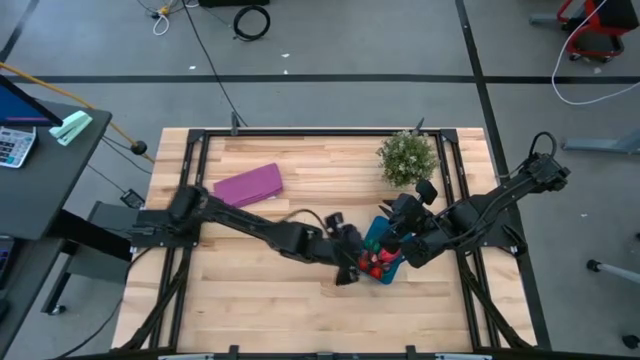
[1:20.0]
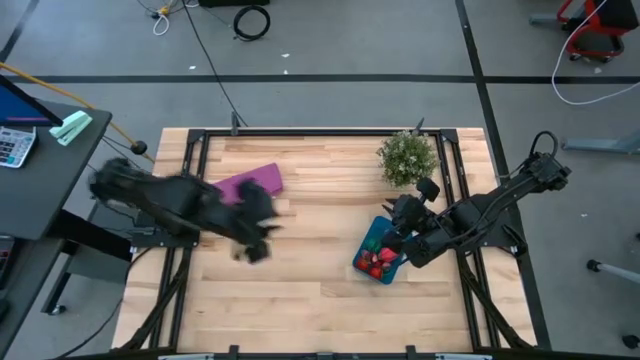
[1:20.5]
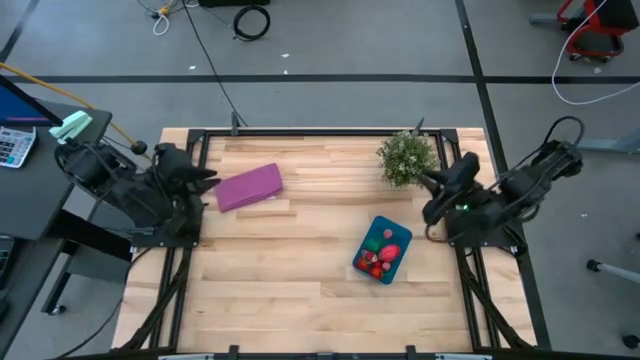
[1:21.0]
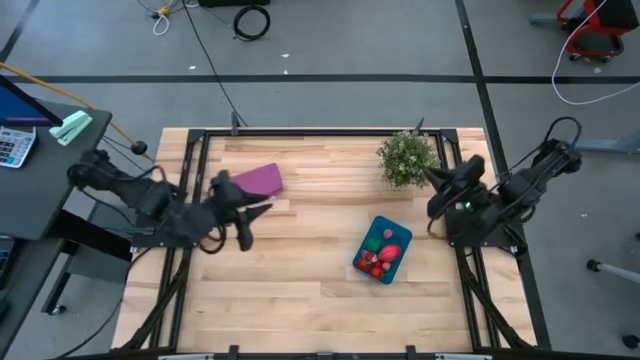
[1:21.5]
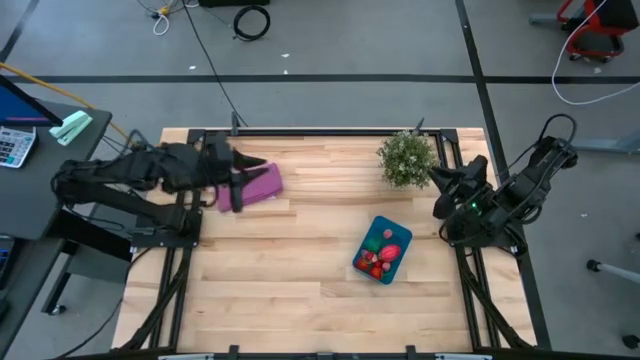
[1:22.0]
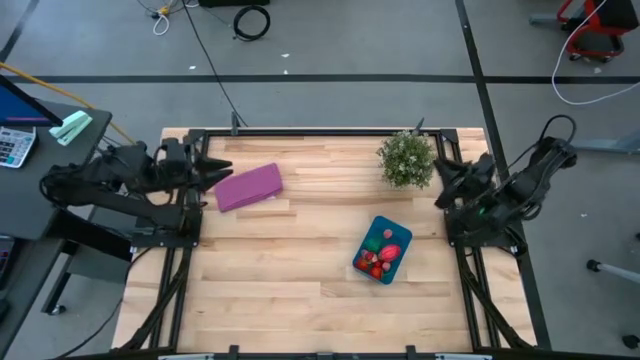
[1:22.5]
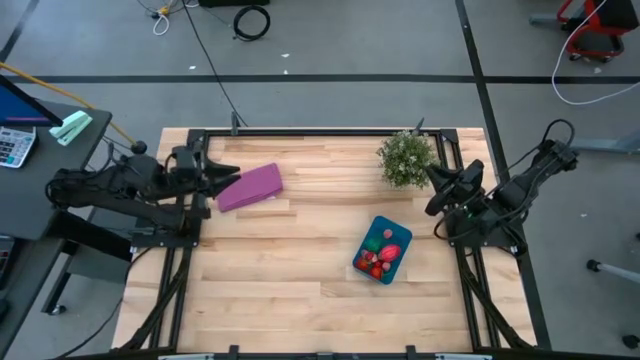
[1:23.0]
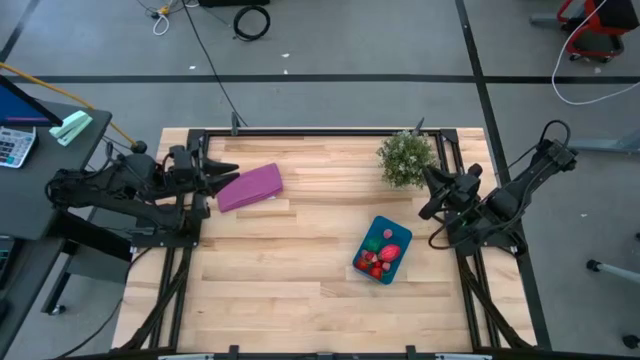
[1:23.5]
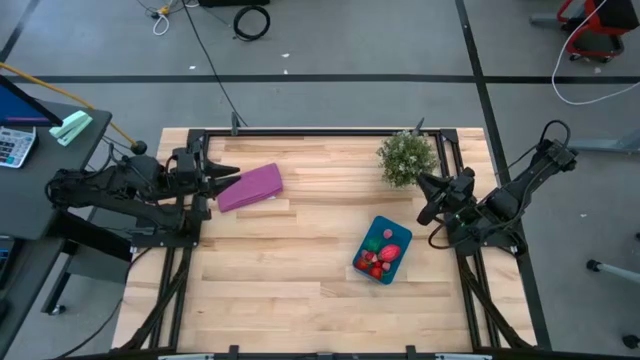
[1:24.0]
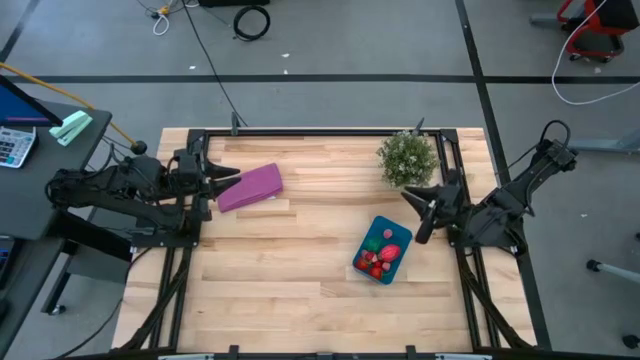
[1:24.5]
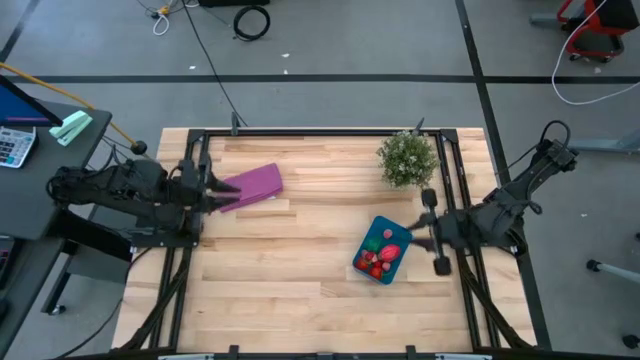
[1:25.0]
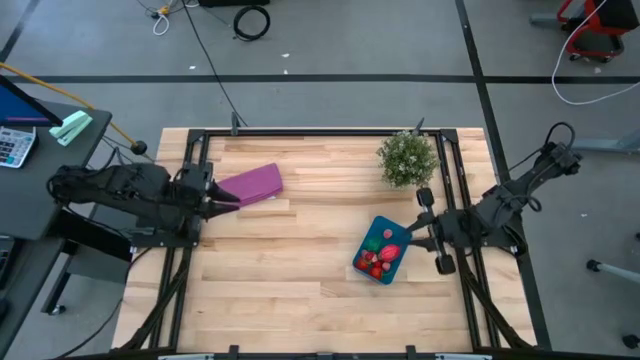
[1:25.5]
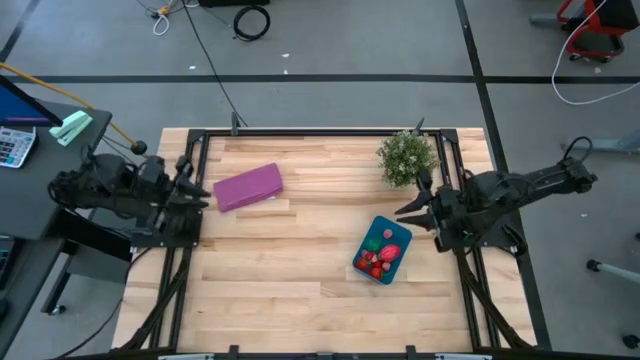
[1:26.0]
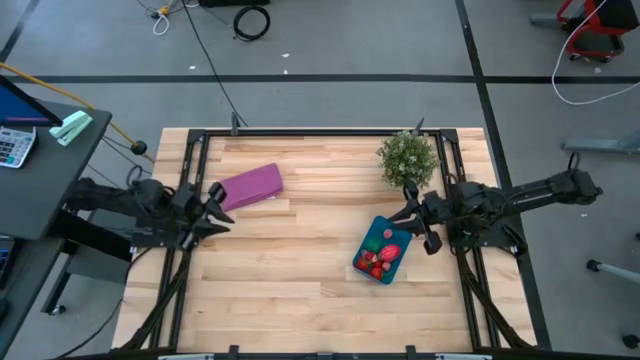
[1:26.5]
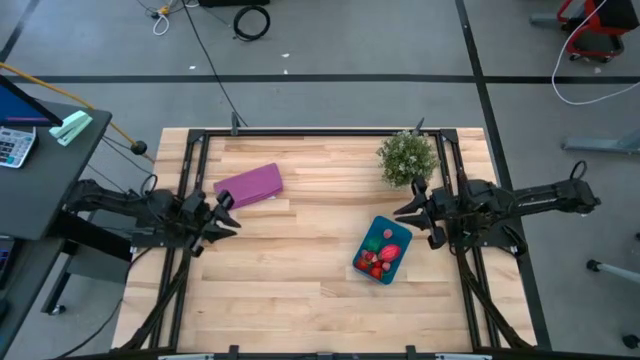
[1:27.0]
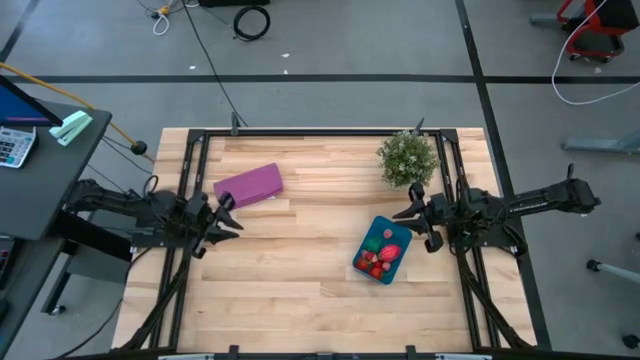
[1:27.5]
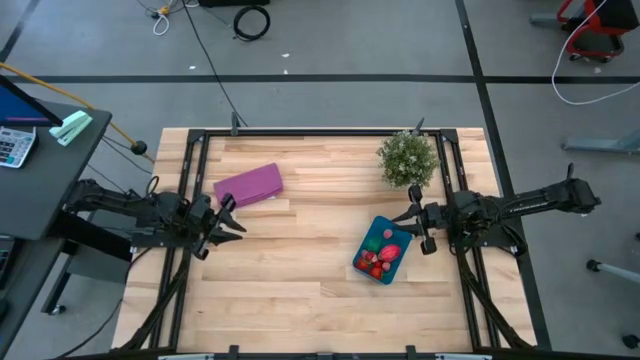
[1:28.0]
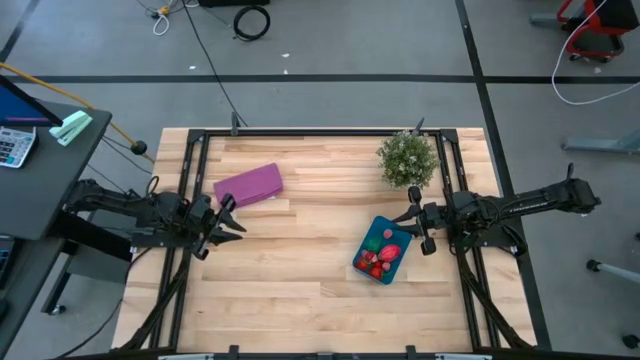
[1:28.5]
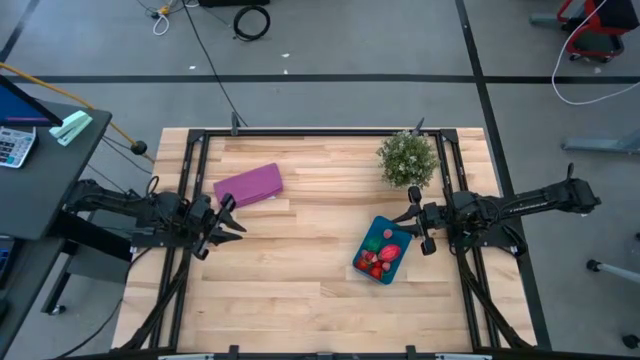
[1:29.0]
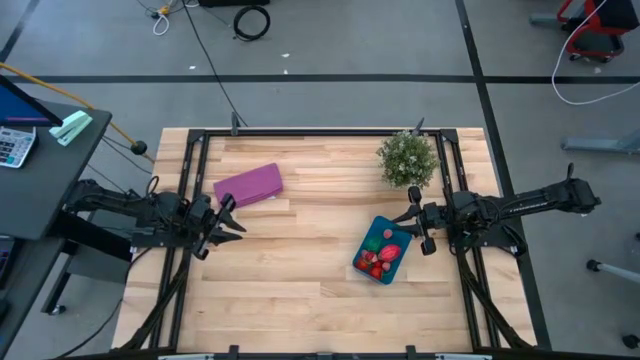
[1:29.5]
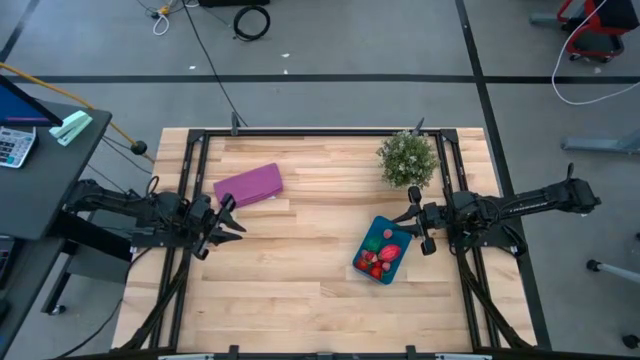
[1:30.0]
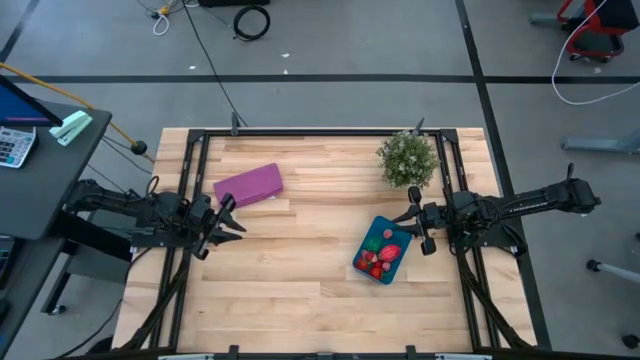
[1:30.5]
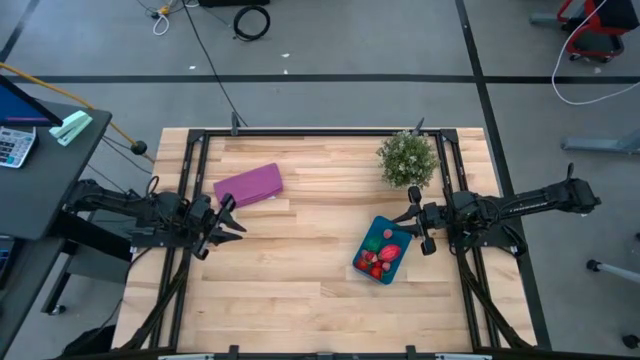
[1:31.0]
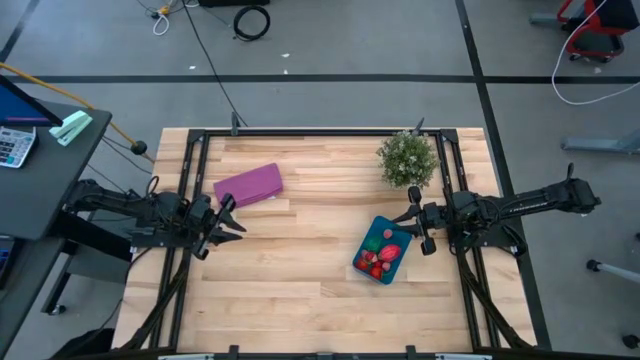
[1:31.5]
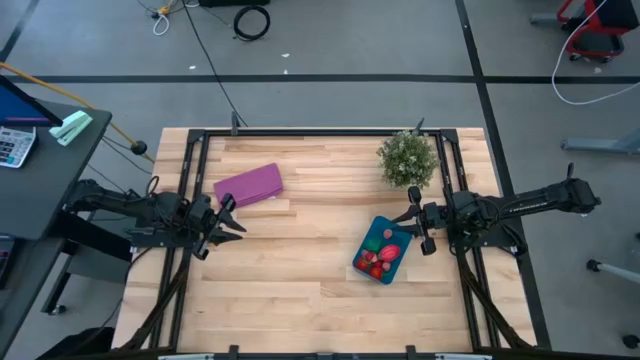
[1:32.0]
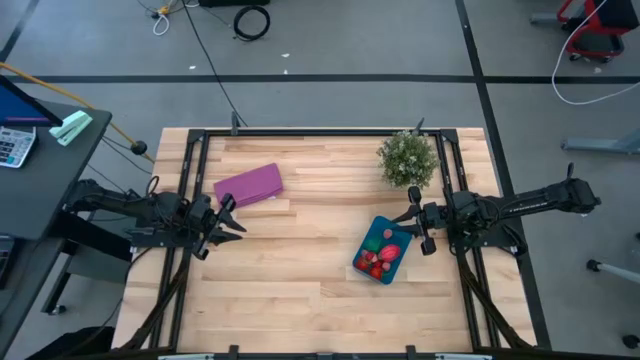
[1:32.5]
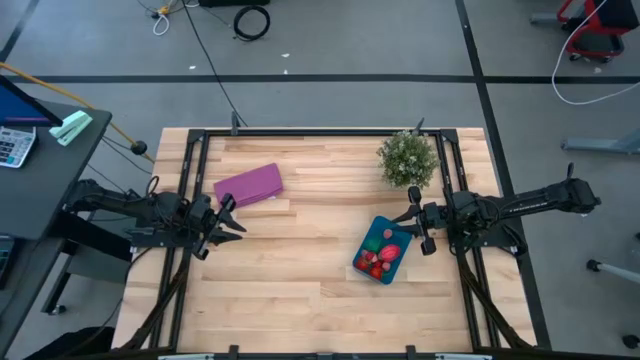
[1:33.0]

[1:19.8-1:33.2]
Task: Pick and placing Produce into tupperware
Return to Home Position

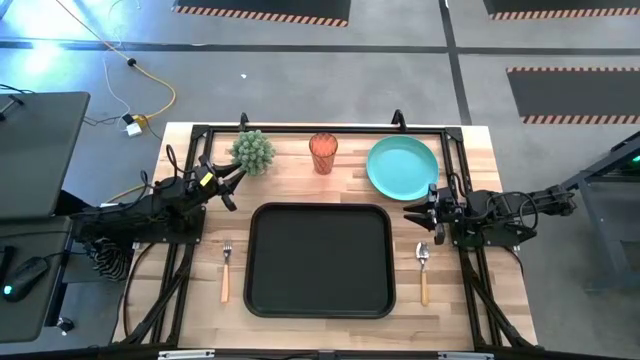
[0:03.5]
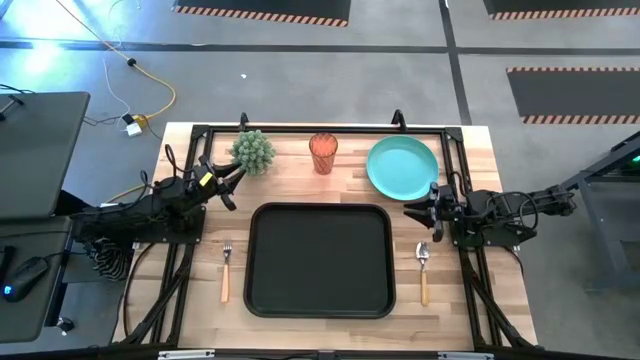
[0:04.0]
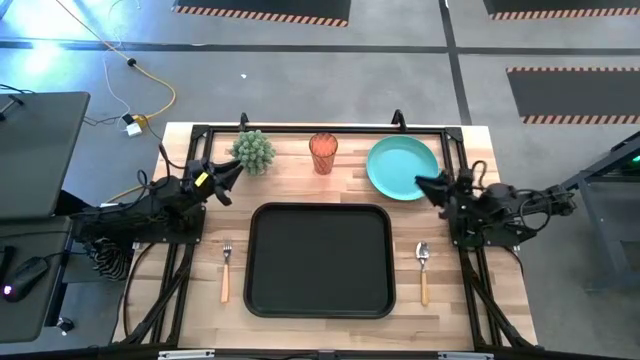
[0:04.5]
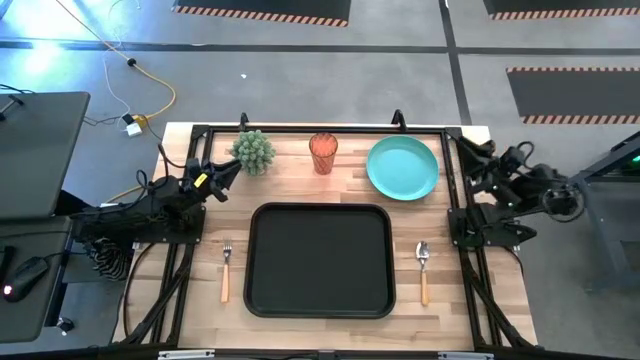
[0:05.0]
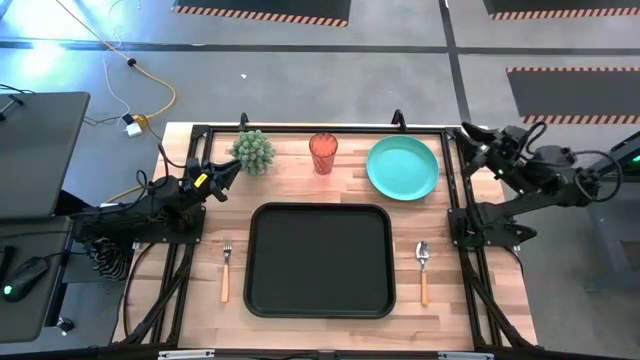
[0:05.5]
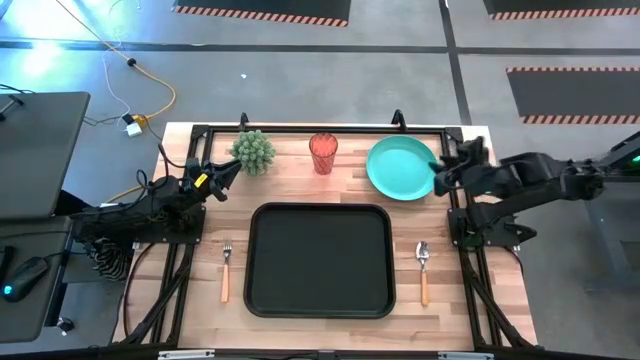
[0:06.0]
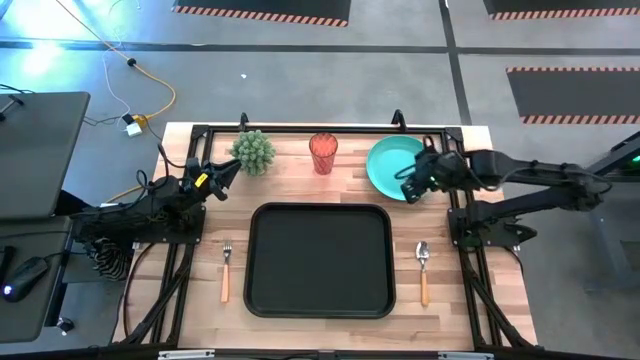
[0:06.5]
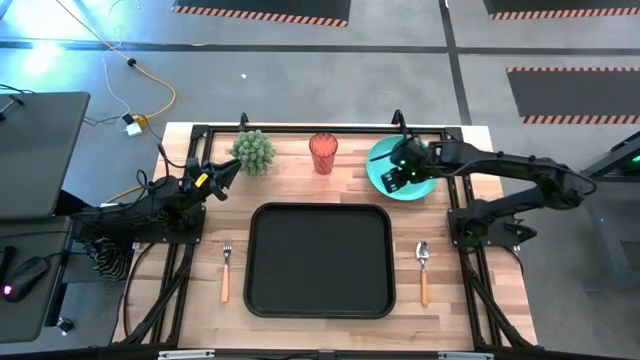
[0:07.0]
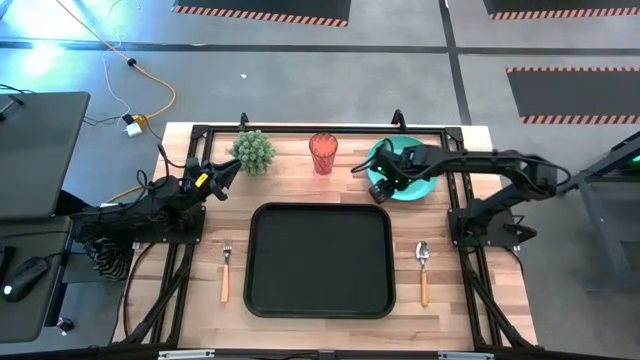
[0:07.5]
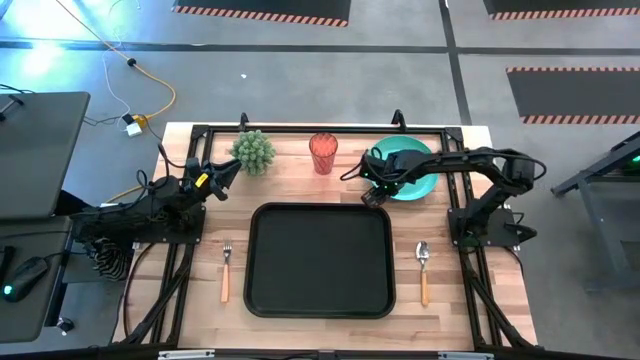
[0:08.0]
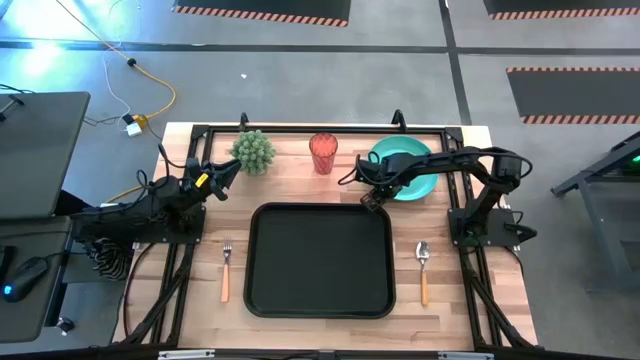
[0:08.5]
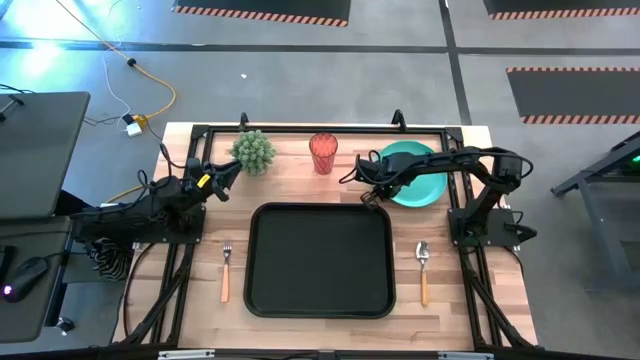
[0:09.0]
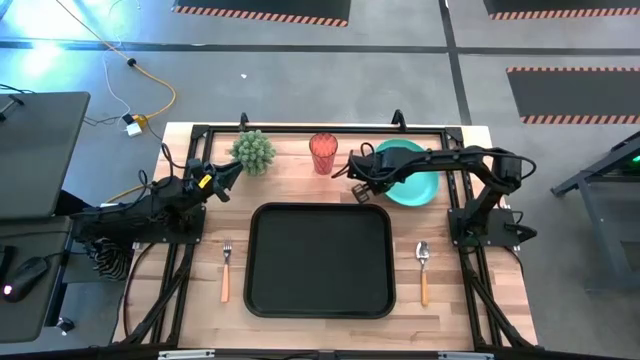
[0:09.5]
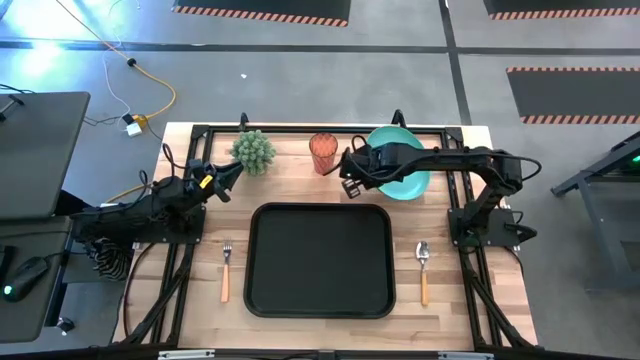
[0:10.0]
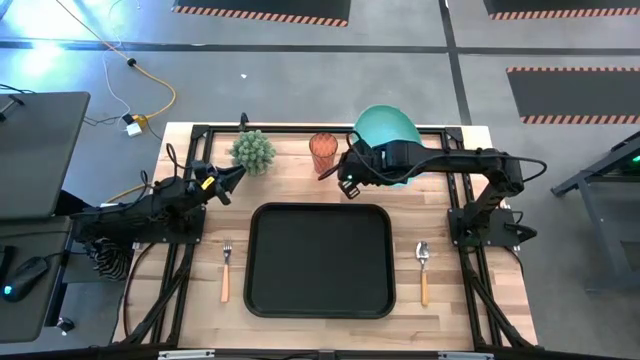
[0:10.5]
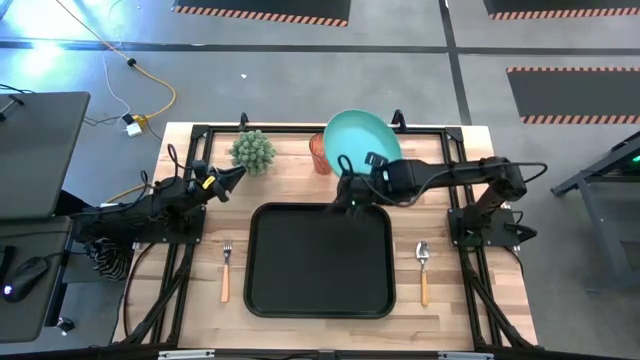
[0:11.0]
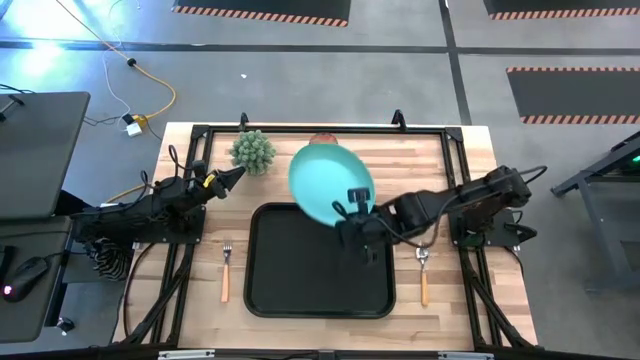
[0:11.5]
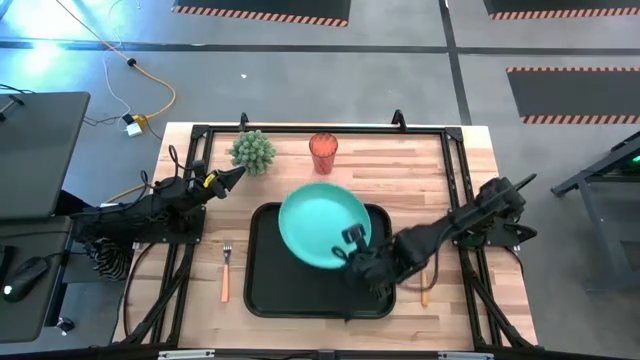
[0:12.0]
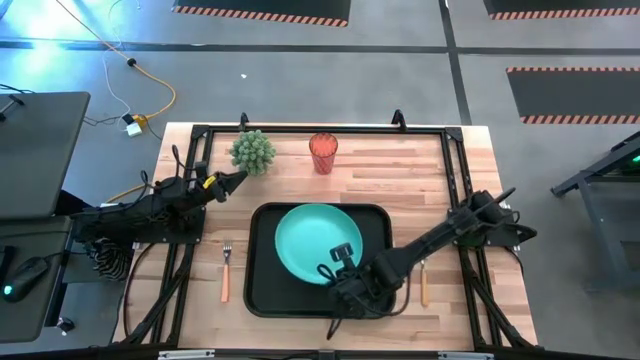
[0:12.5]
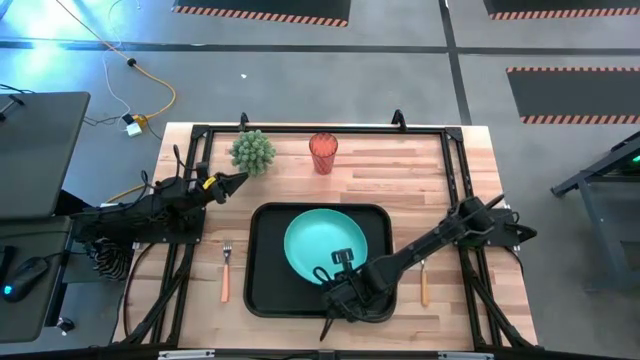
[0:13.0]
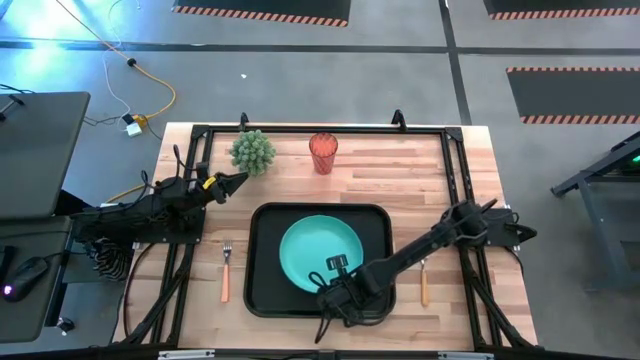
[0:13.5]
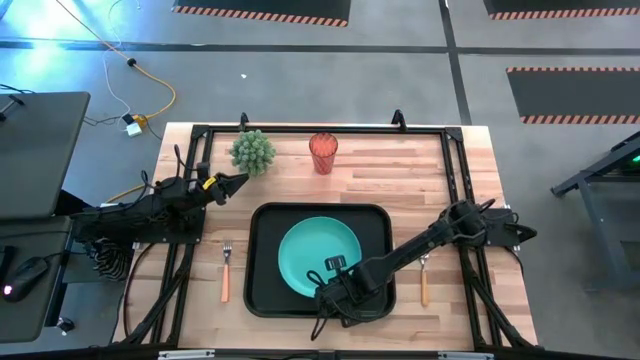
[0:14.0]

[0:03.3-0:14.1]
Task: Pick and place plate/cup/fork/spoon on tray
Put the blue plate on the black tray
